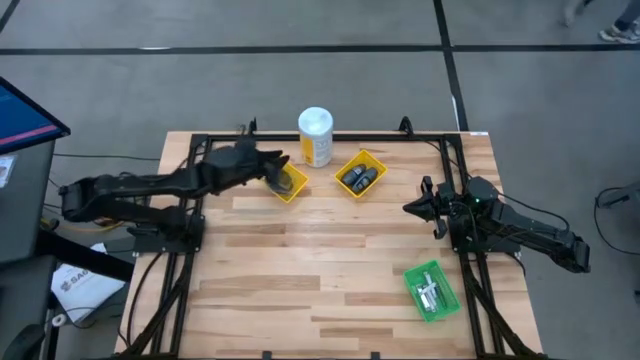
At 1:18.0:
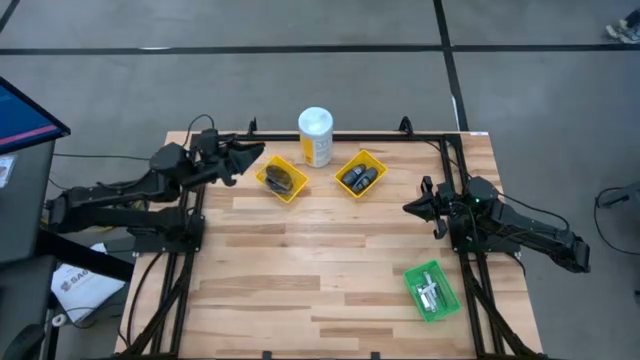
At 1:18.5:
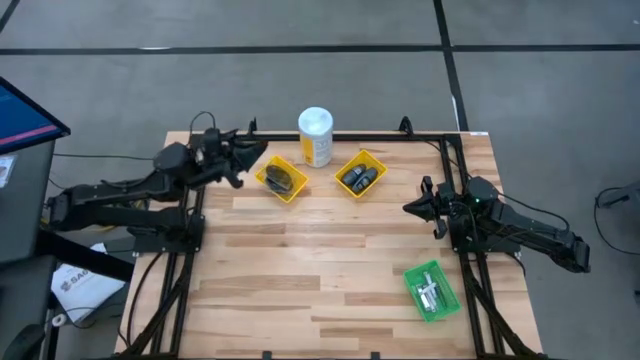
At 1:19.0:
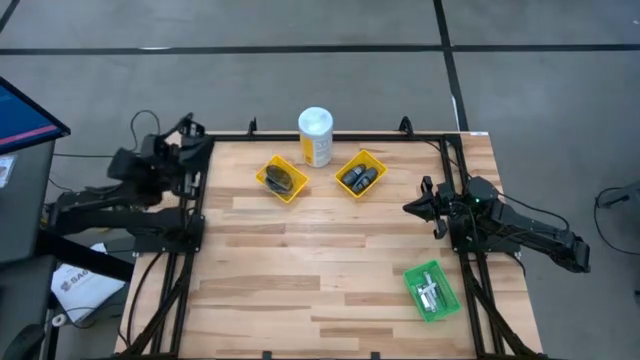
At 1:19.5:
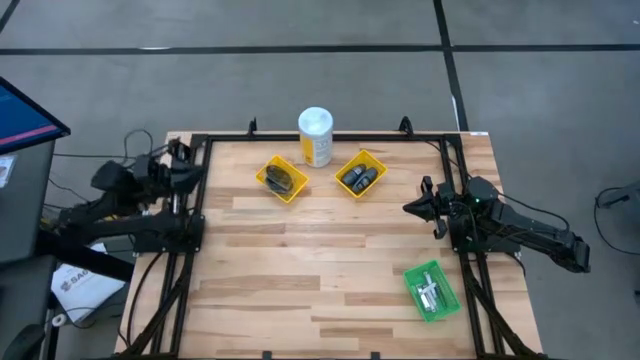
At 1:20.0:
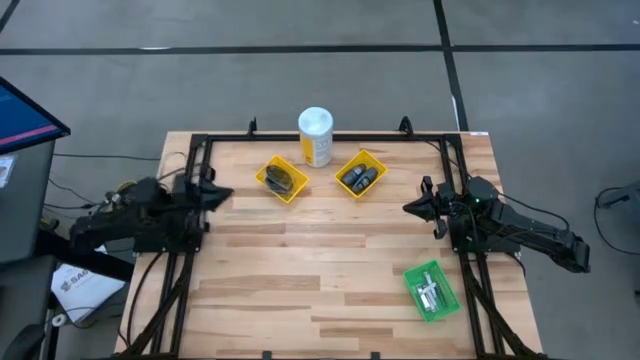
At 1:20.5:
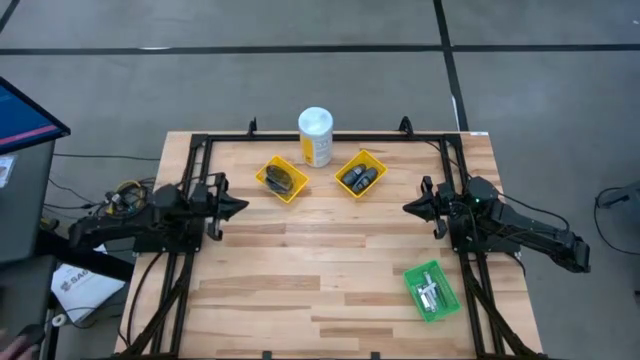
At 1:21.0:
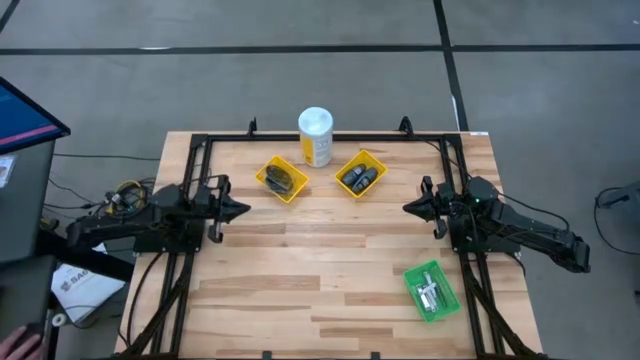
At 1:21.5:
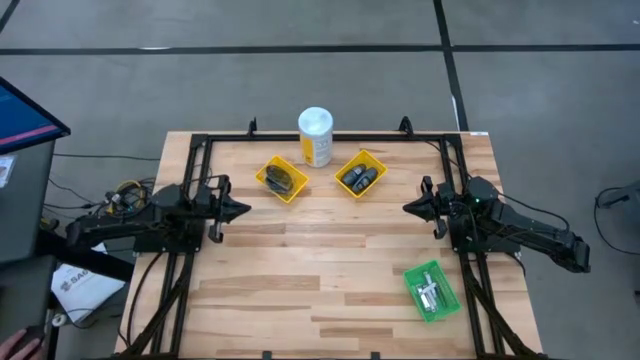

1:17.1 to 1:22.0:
Task: Pick & Place Travel size toiletries
Return to Home Position

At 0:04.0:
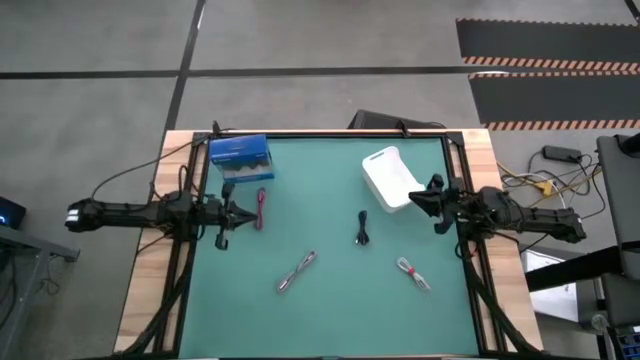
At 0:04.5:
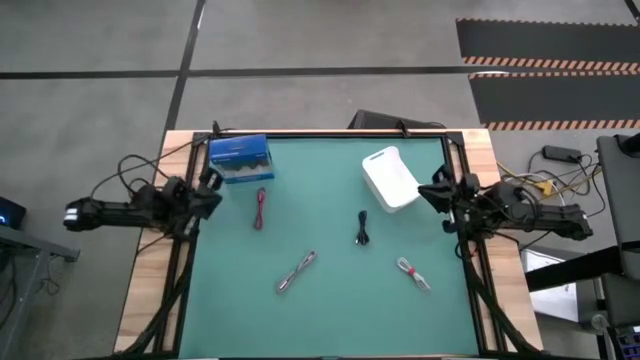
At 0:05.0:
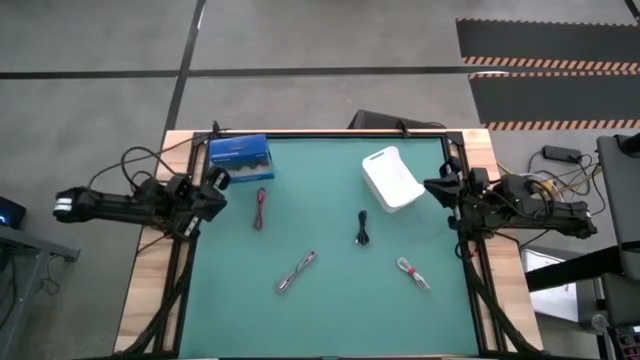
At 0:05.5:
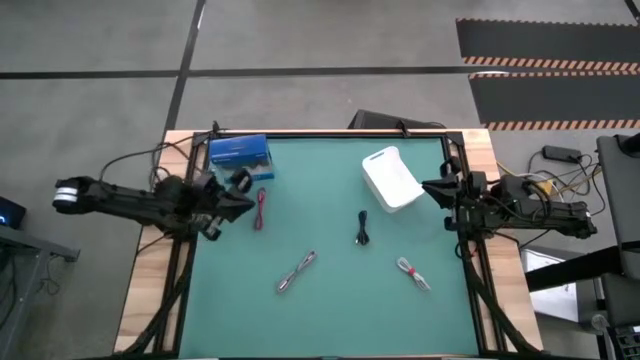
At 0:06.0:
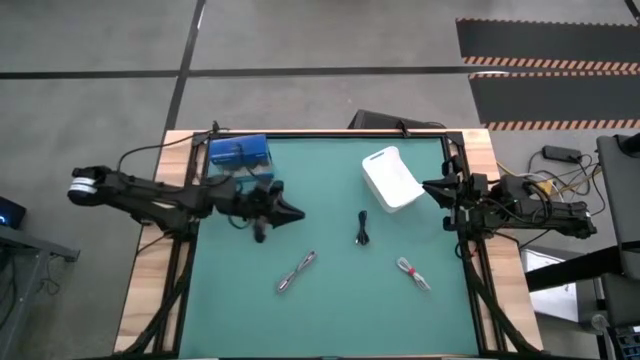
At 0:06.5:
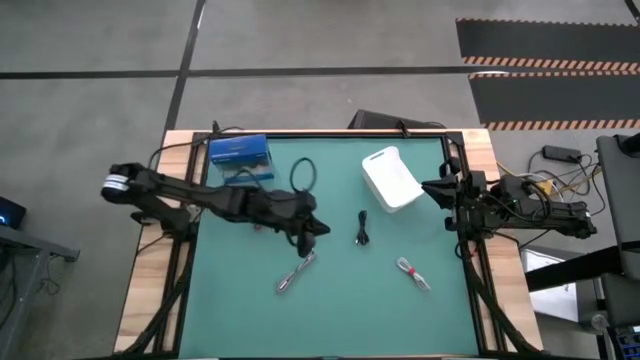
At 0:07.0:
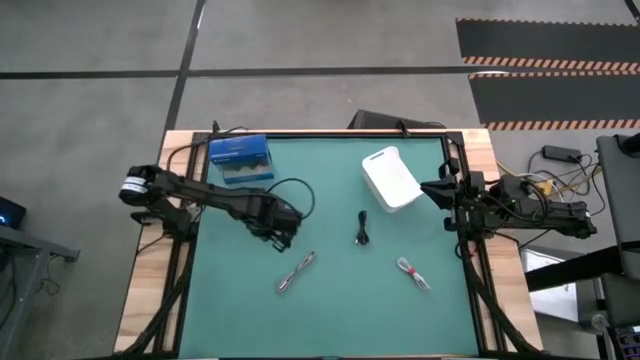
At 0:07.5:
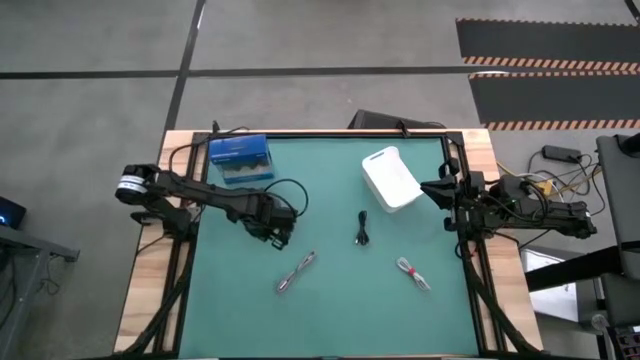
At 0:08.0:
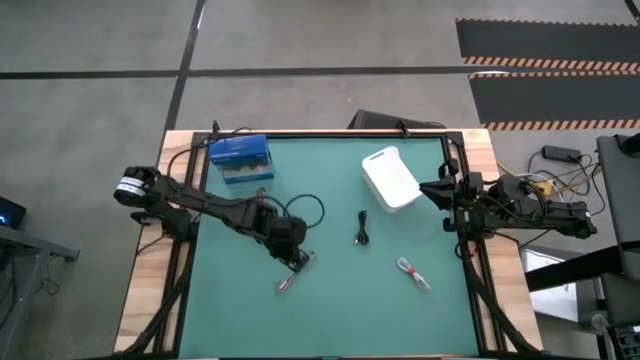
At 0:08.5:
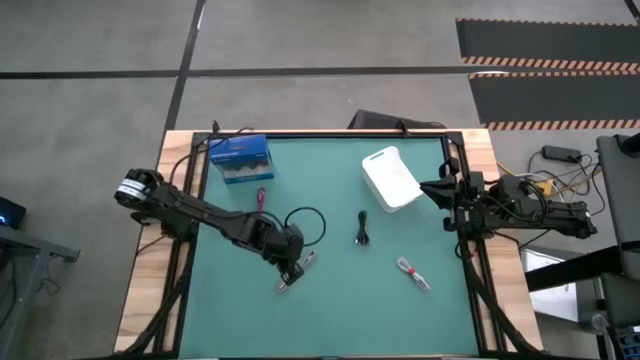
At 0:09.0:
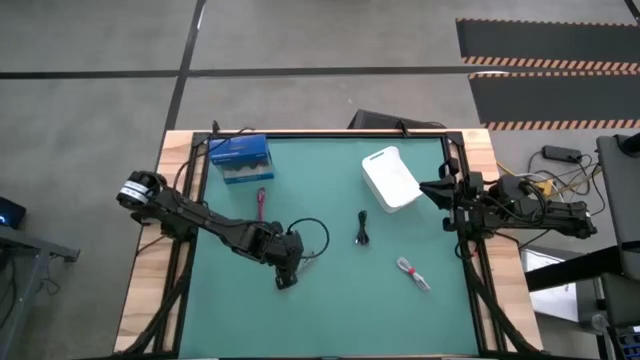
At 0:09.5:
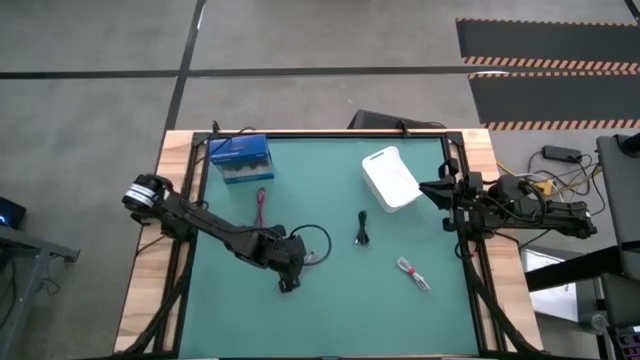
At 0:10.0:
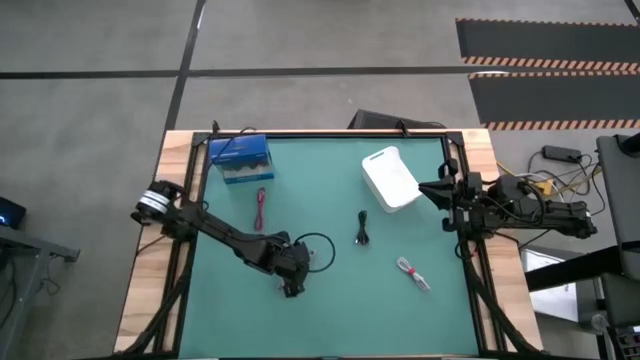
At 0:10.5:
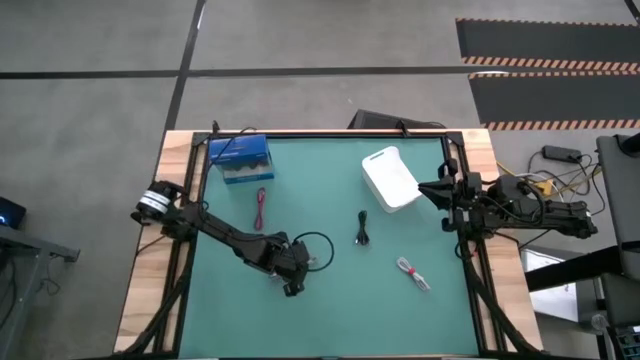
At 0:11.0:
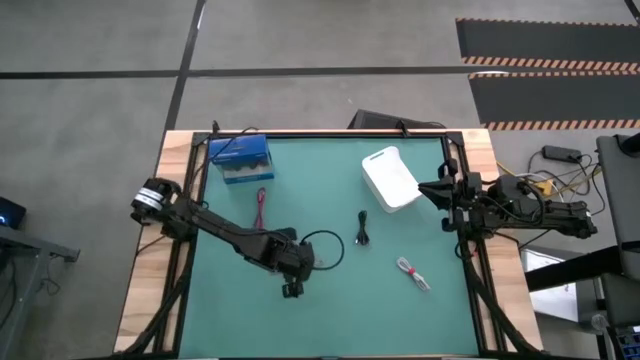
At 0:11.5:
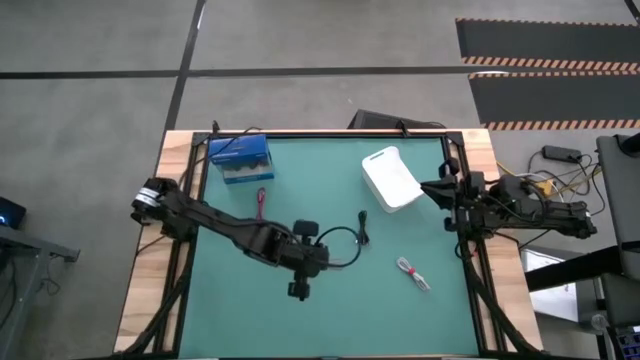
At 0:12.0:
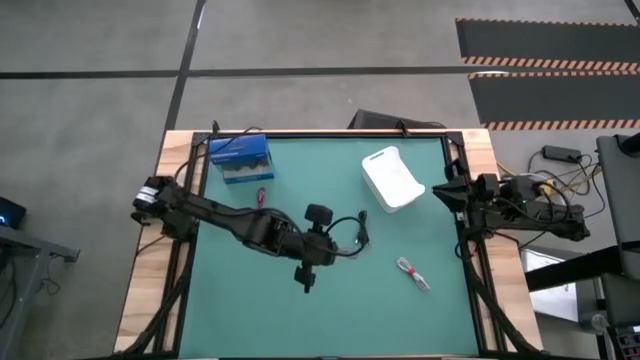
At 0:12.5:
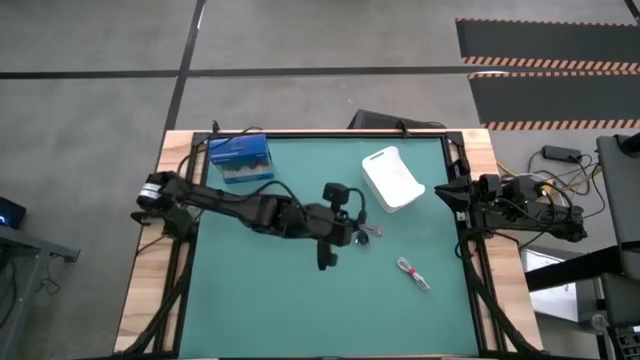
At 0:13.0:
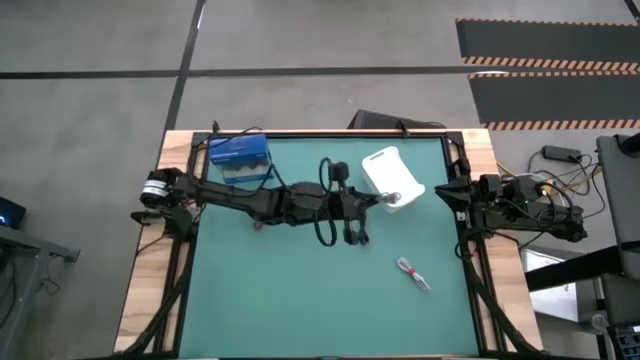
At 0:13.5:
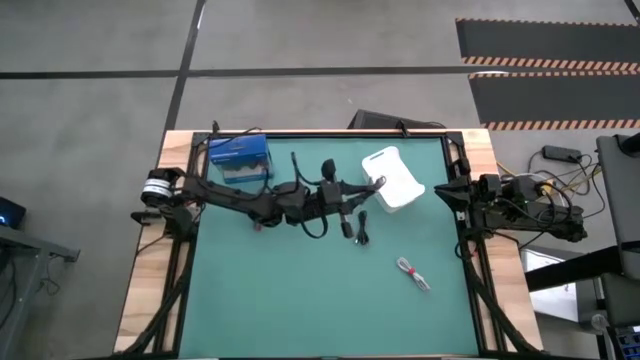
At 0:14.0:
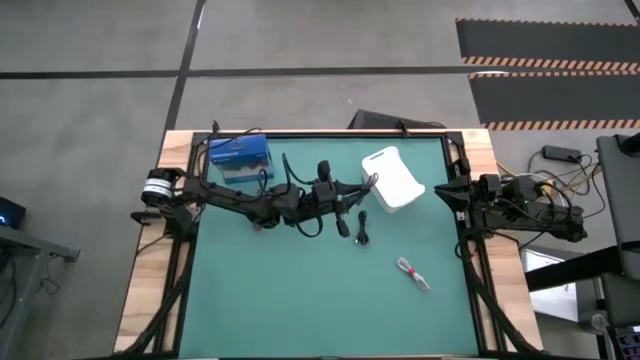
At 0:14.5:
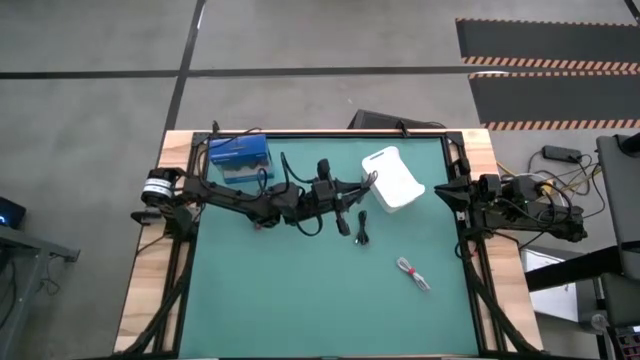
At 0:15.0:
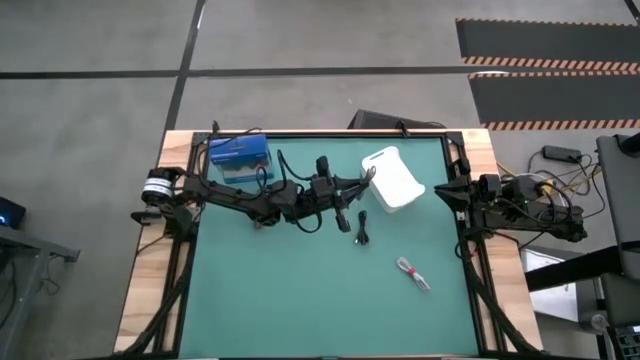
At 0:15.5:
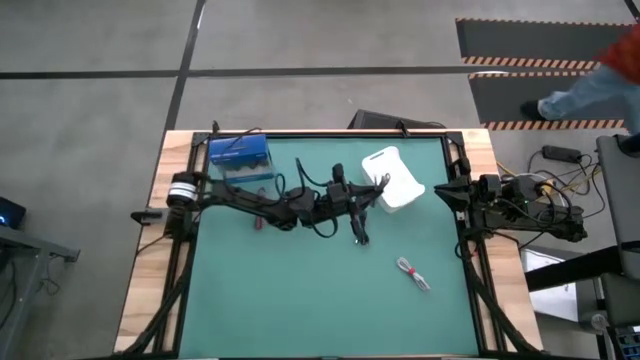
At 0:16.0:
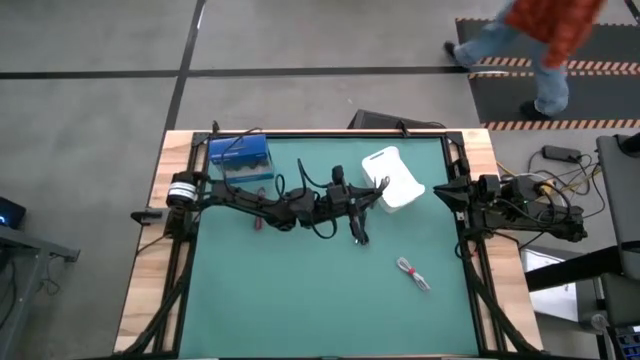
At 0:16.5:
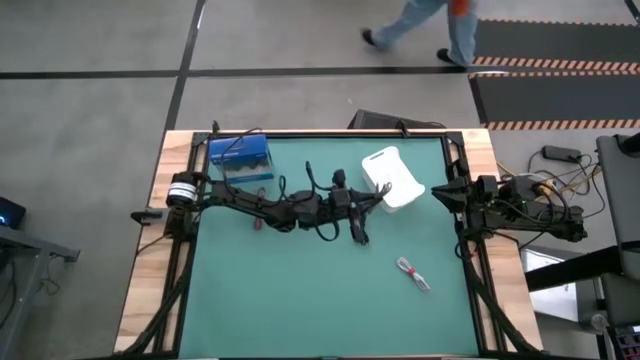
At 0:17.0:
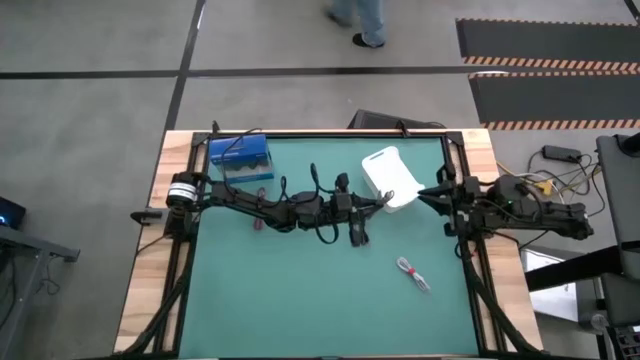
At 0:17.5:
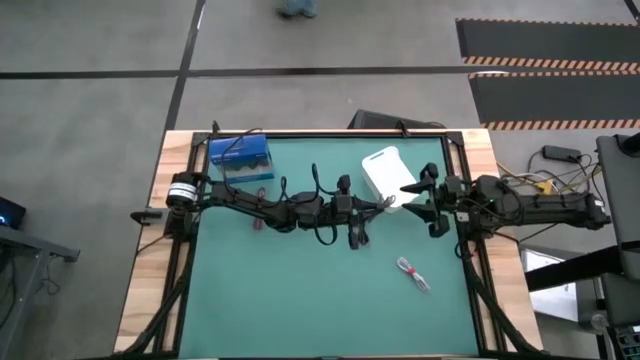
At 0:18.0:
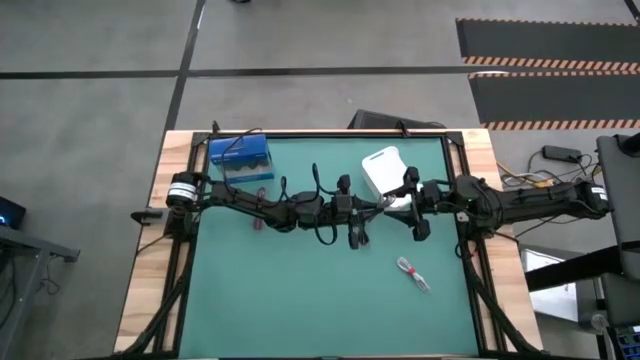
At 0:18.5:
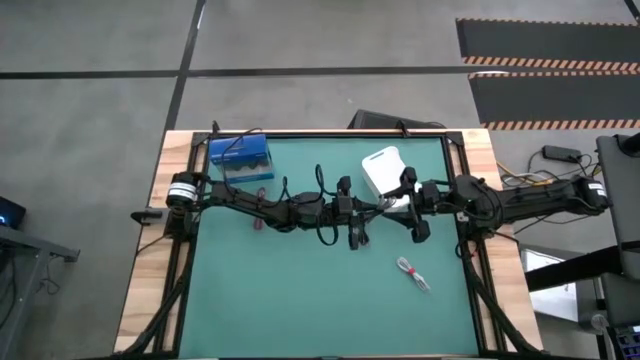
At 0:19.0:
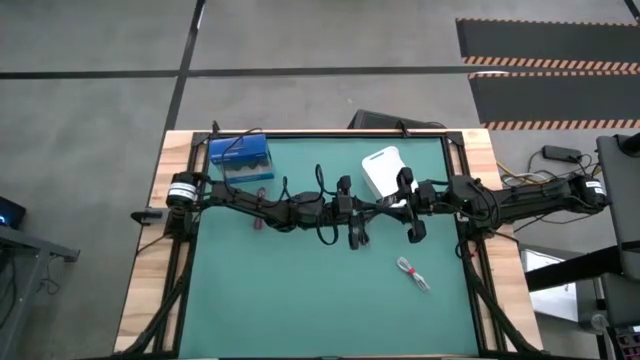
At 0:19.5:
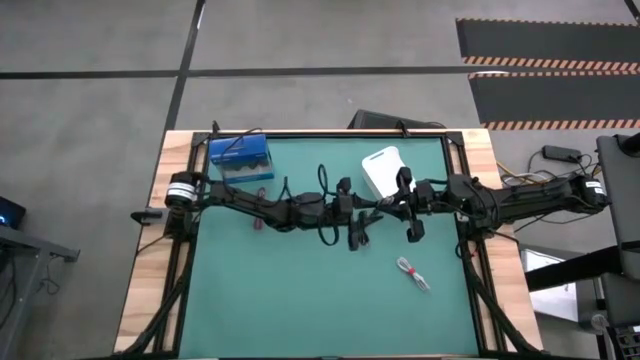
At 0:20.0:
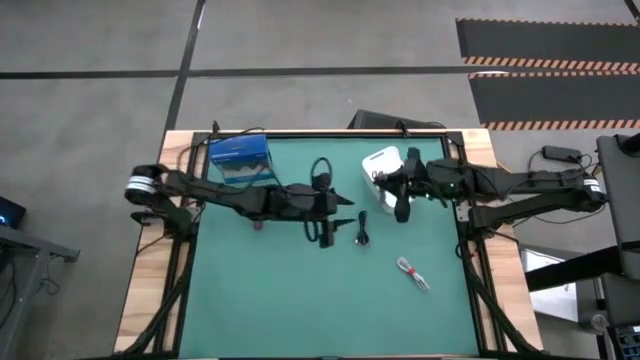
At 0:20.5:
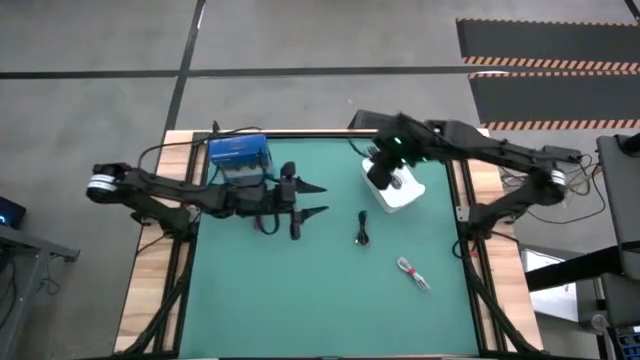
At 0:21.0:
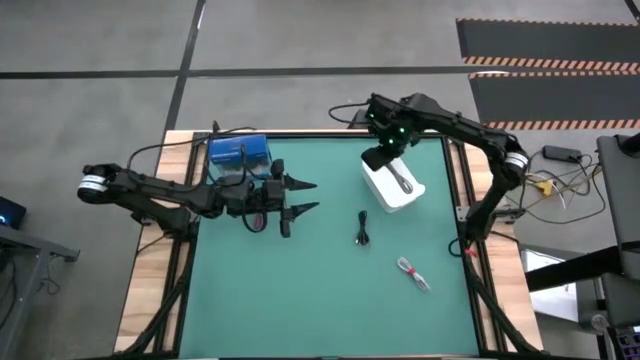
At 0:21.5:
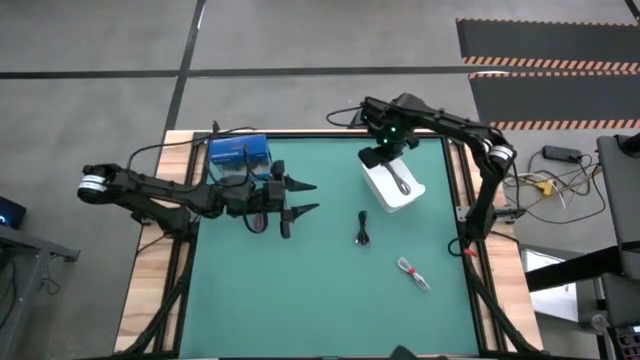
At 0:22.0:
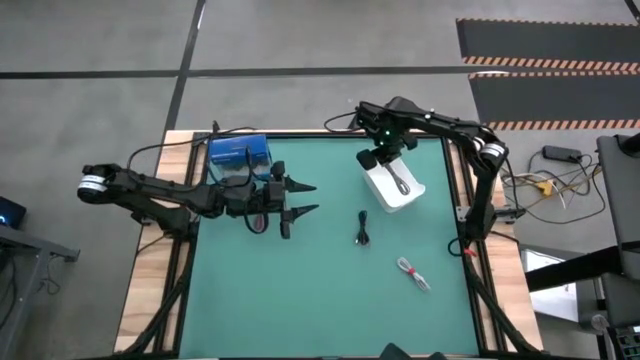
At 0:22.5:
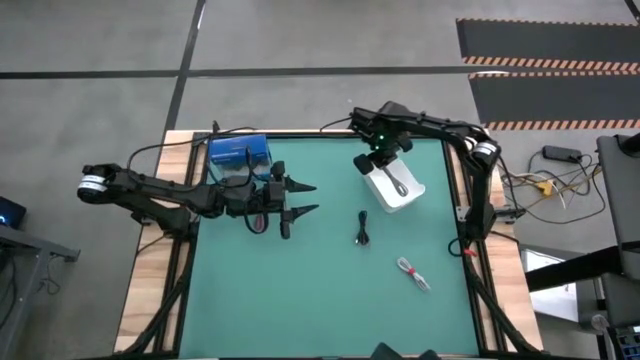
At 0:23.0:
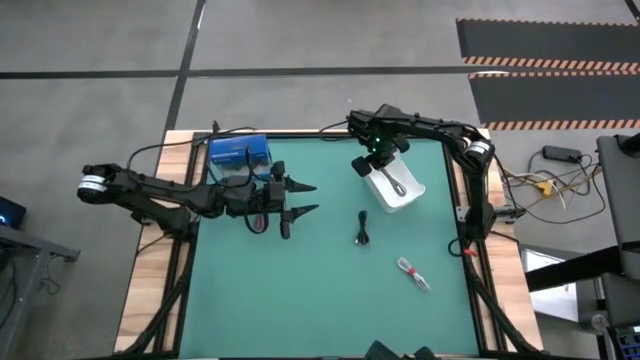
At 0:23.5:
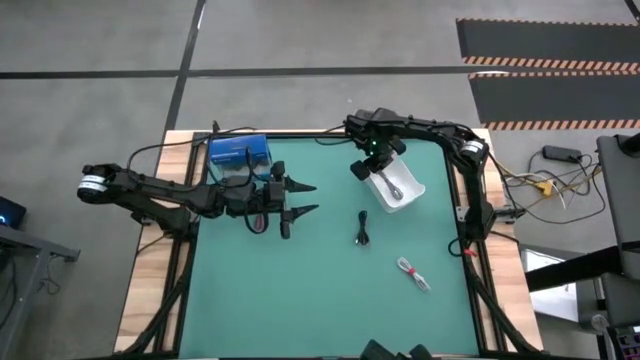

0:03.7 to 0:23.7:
Task: Pick and place USB-C Cables
Put the black and white charger cable into the white container
